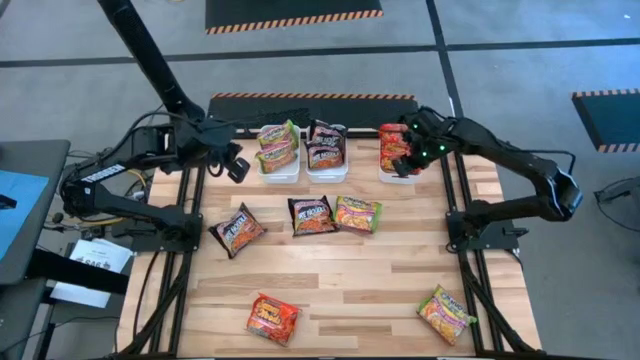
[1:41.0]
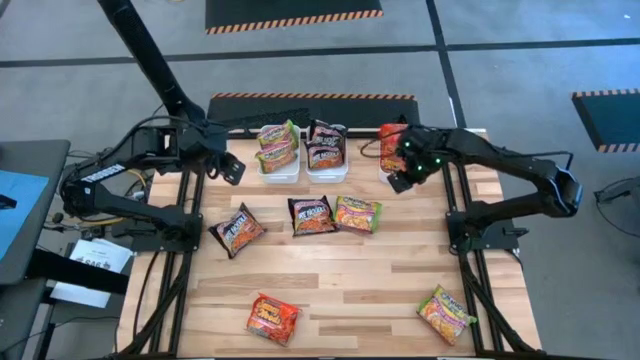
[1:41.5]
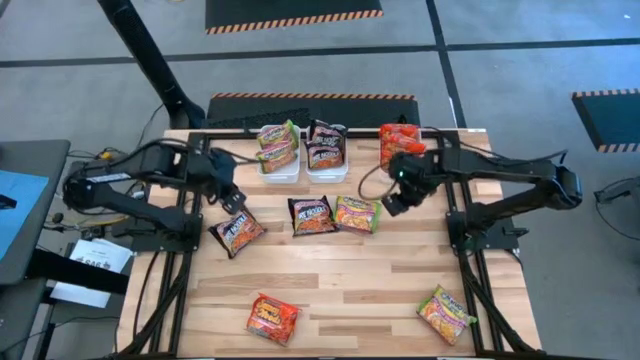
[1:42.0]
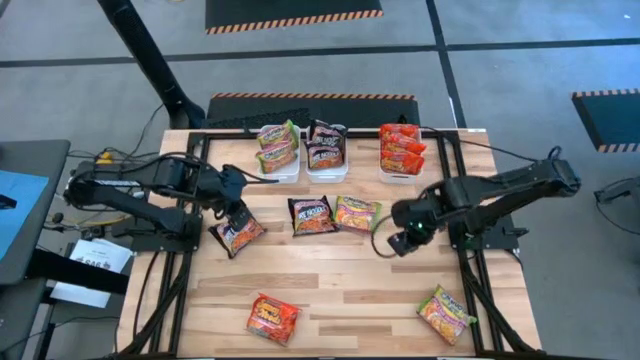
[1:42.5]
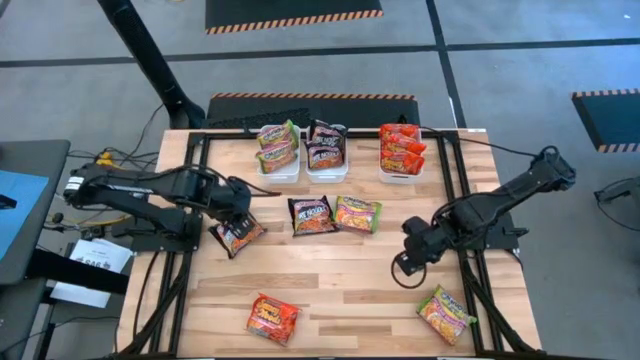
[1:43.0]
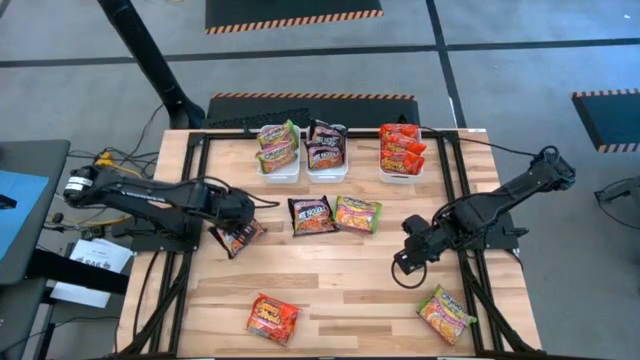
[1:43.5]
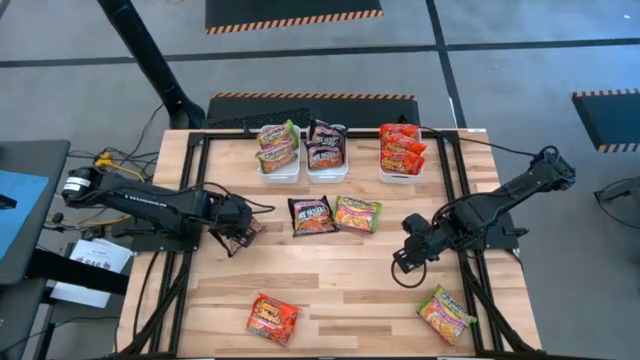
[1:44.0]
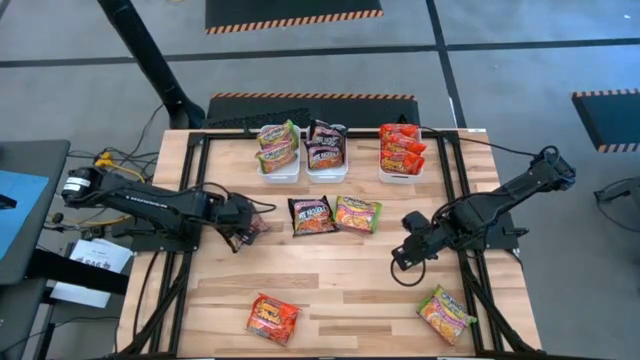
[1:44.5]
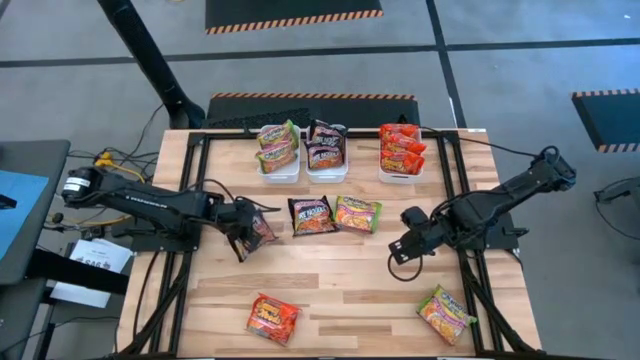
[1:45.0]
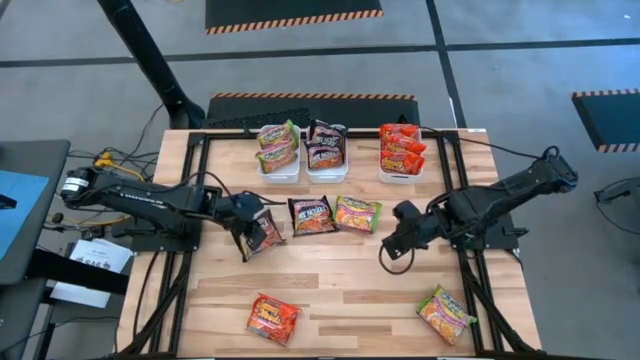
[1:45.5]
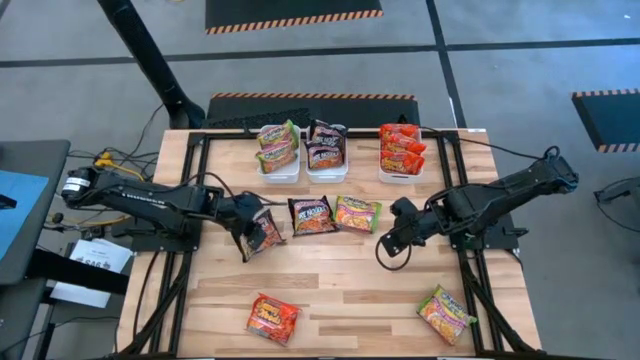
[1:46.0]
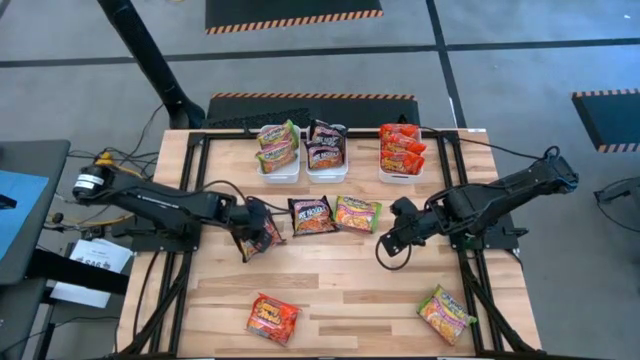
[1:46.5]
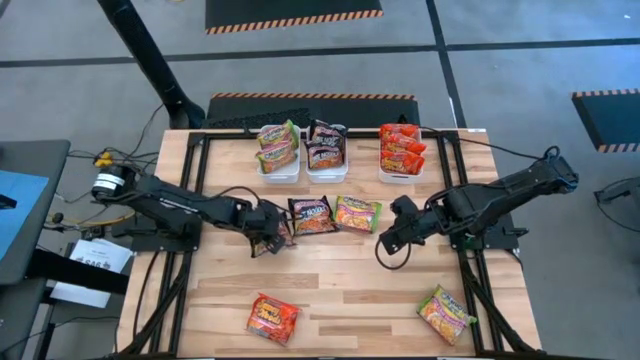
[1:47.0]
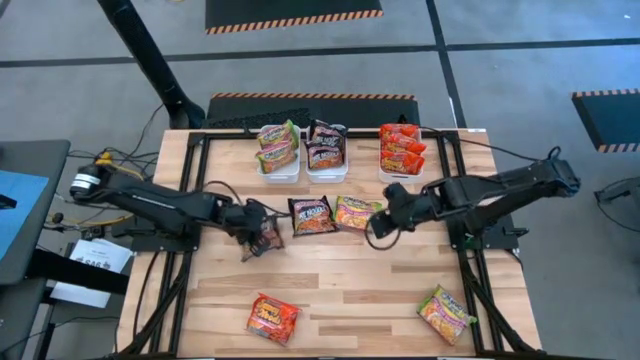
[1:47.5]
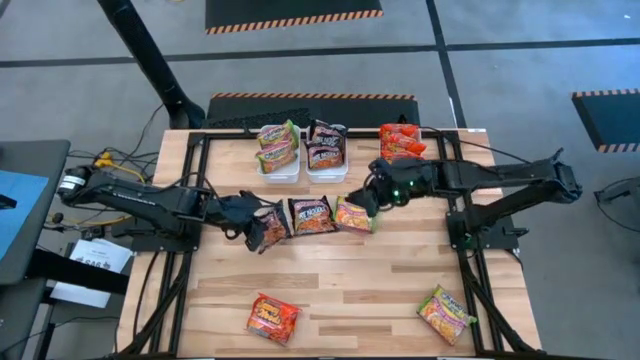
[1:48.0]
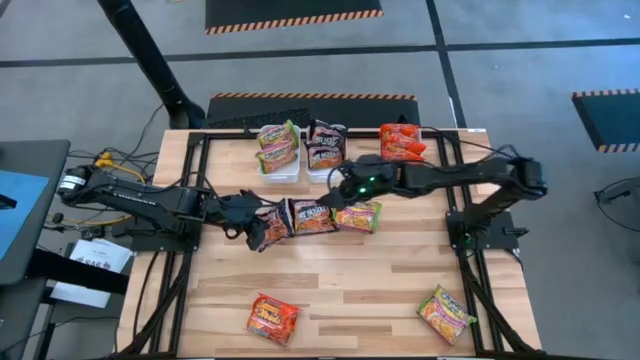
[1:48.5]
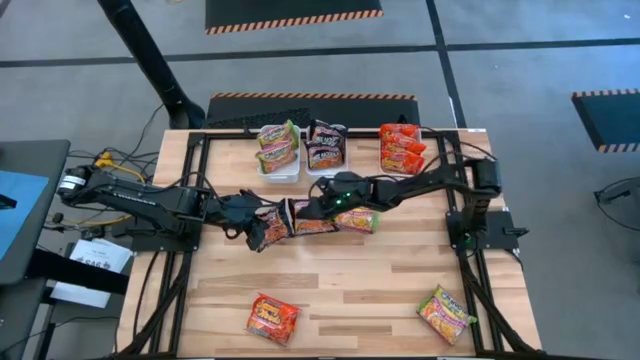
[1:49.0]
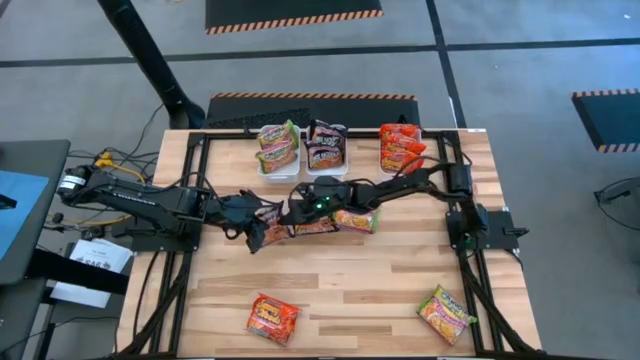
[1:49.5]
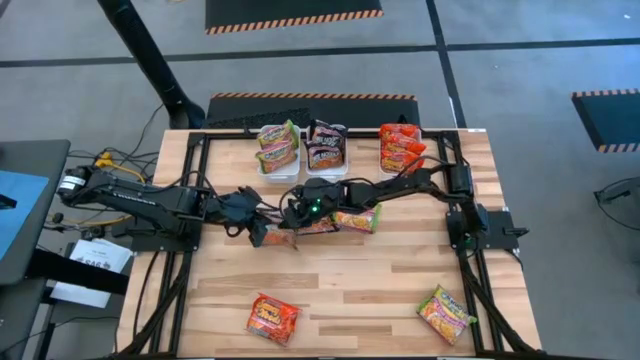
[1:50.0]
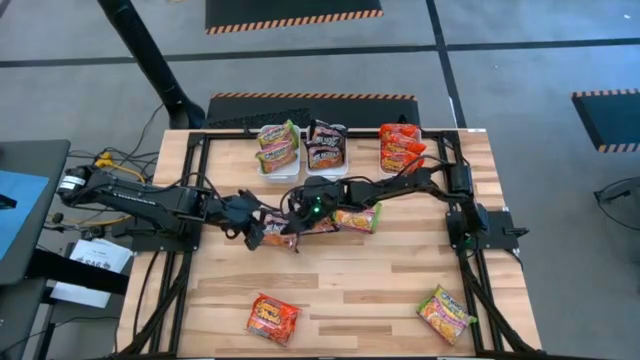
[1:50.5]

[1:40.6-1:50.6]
Task: Sort Maruchan noodles
Put the black noodle pack into the middle white bin

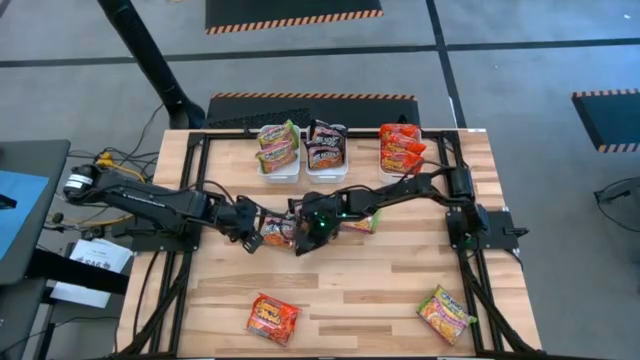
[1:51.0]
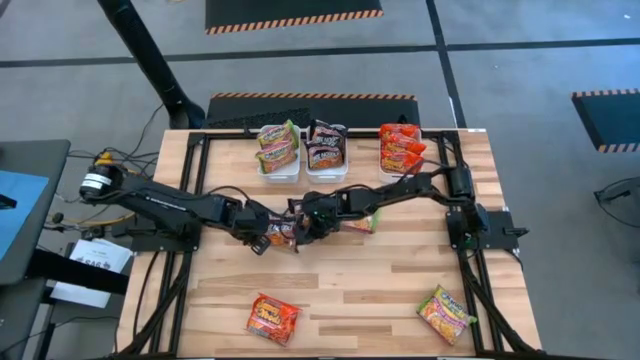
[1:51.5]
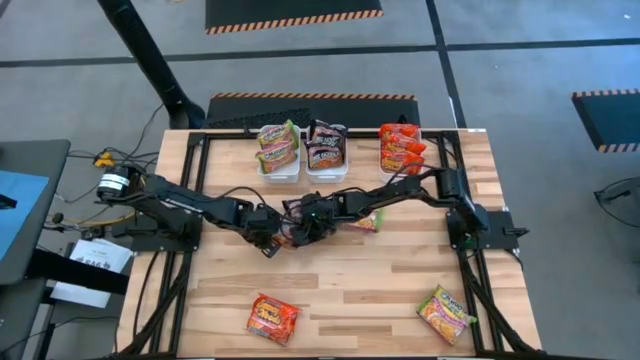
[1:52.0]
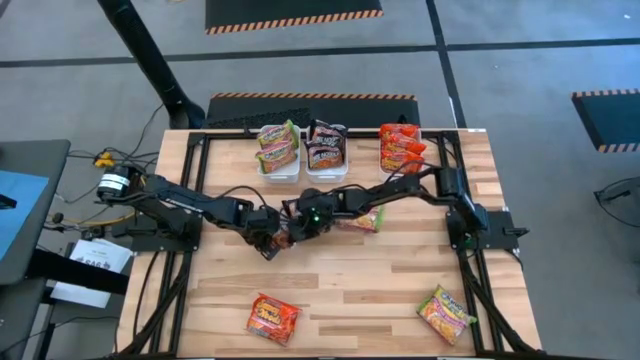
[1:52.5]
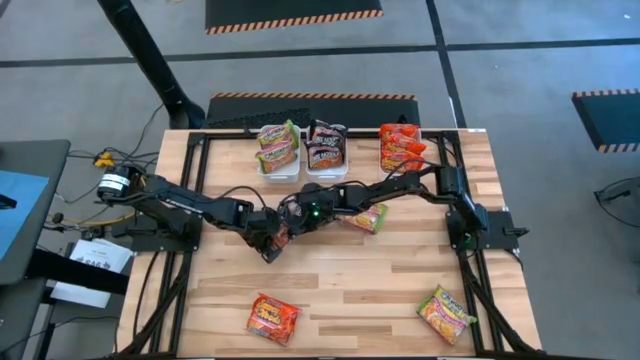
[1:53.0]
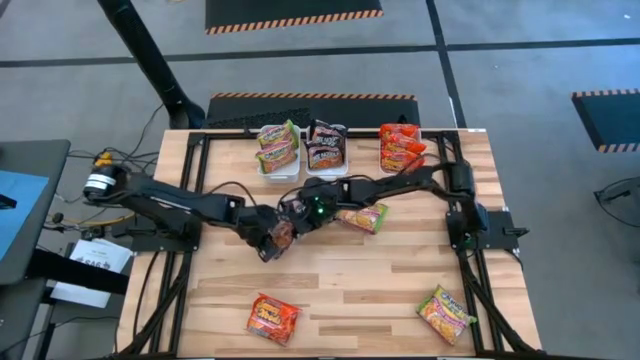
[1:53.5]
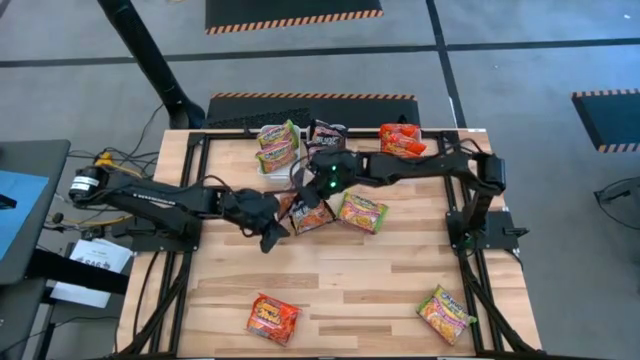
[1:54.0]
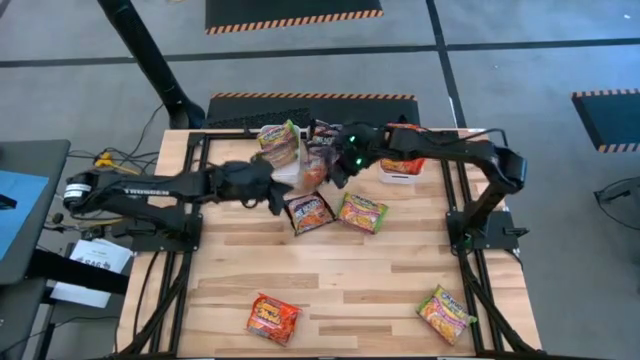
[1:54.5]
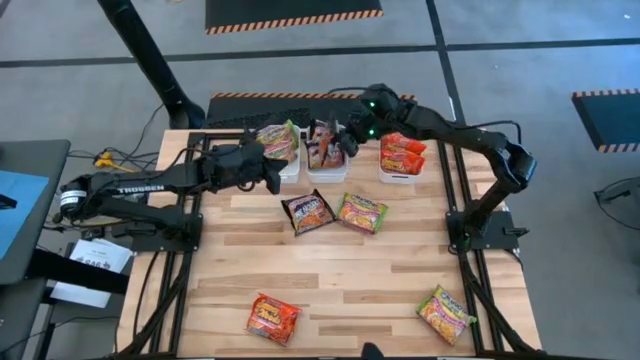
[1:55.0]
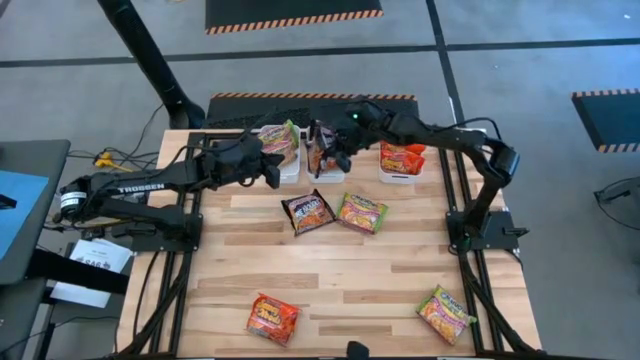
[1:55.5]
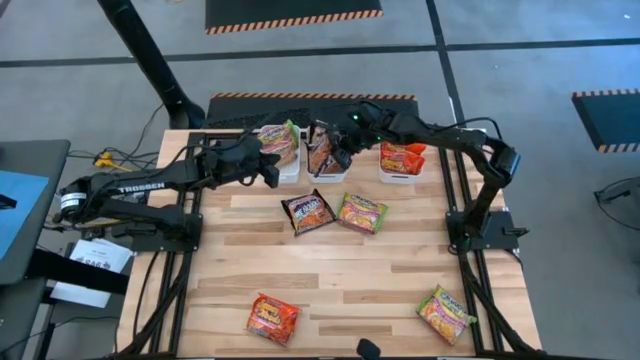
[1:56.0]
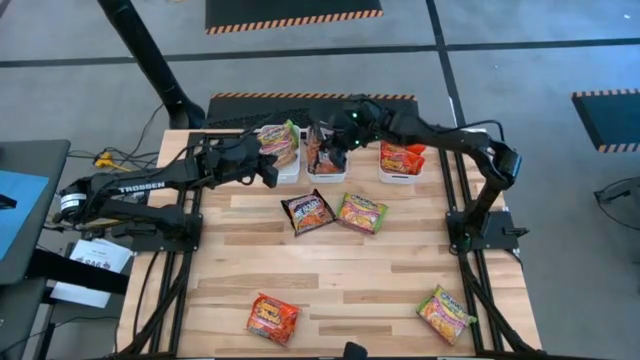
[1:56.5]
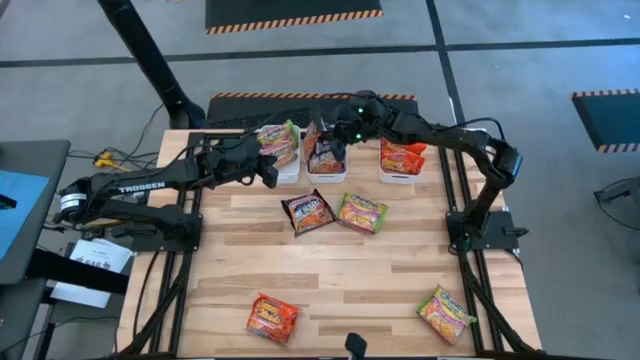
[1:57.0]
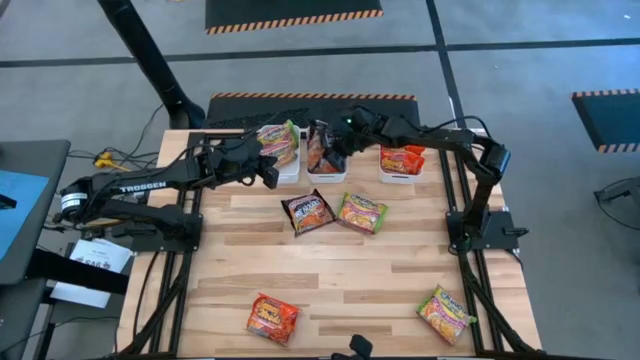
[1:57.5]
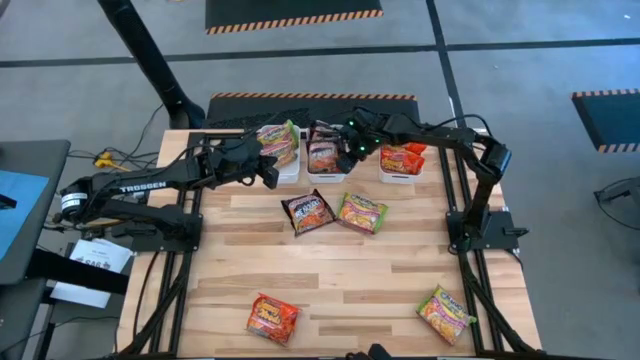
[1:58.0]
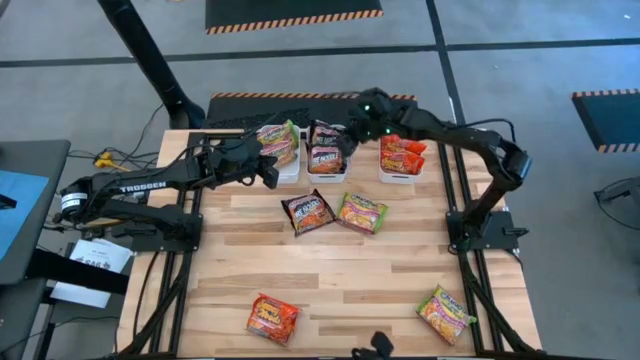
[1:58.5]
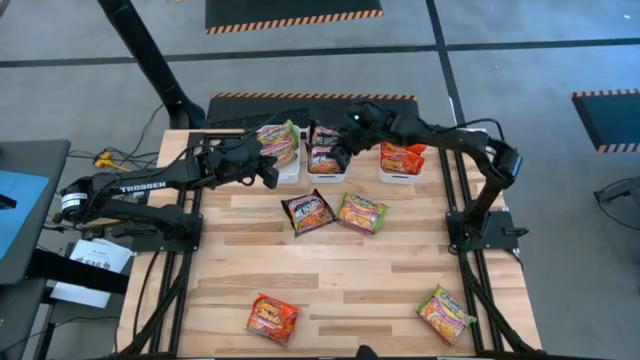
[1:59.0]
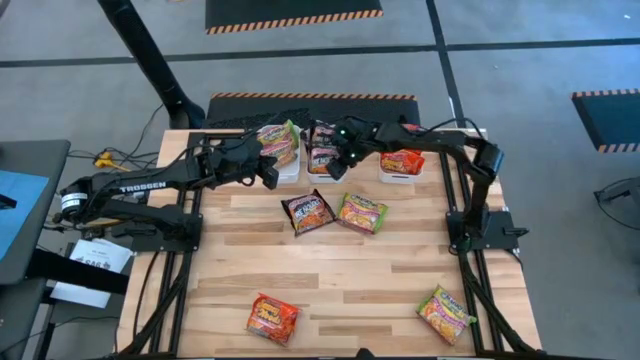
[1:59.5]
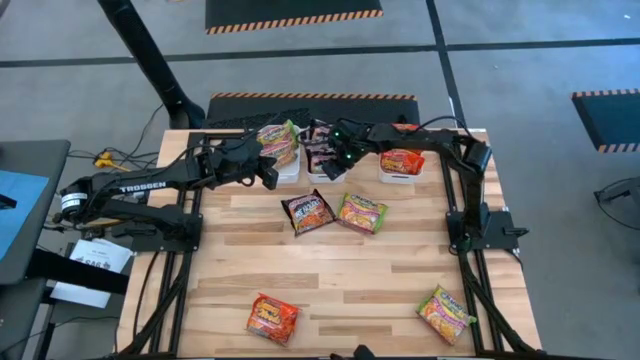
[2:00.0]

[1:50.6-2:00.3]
Put the black noodle pack into the middle white bin

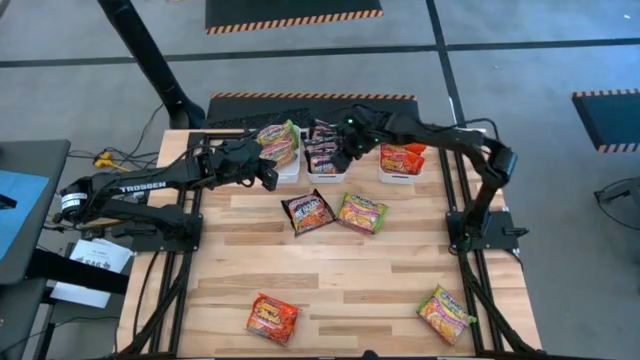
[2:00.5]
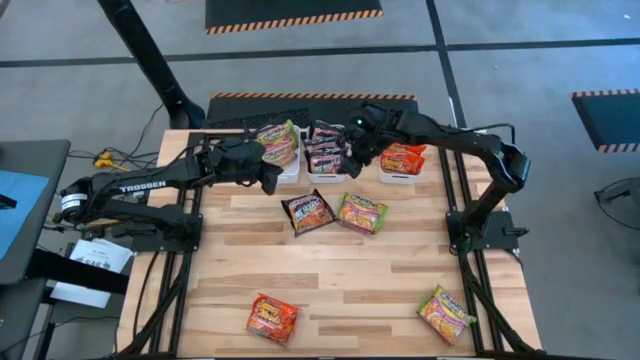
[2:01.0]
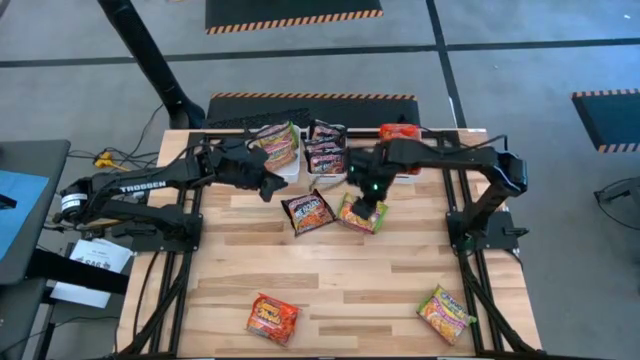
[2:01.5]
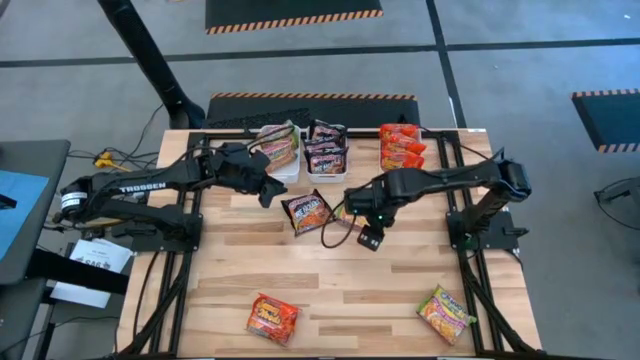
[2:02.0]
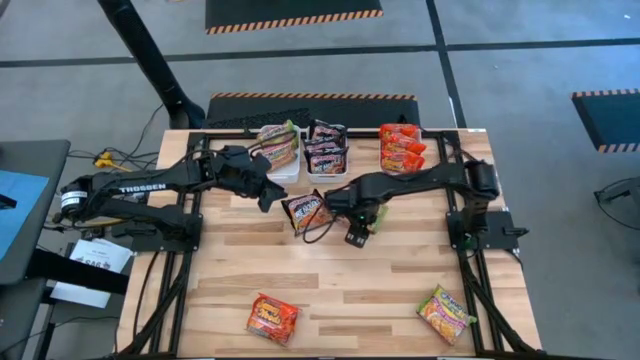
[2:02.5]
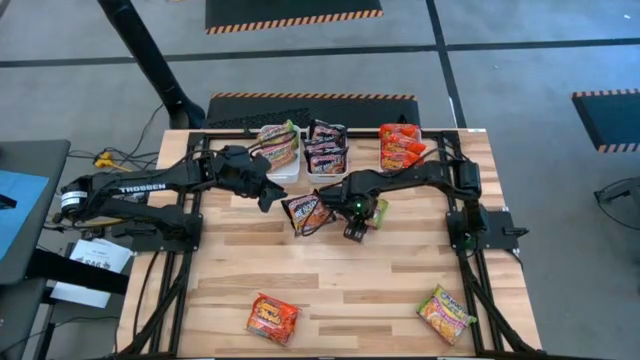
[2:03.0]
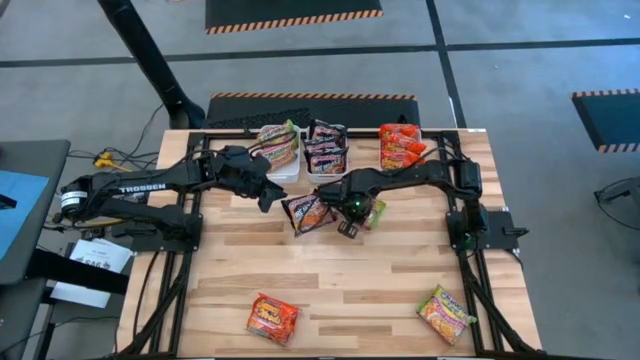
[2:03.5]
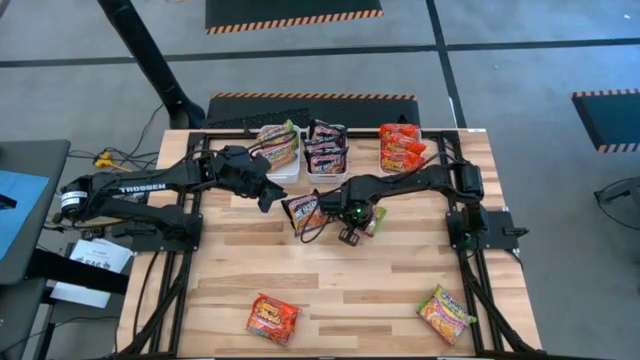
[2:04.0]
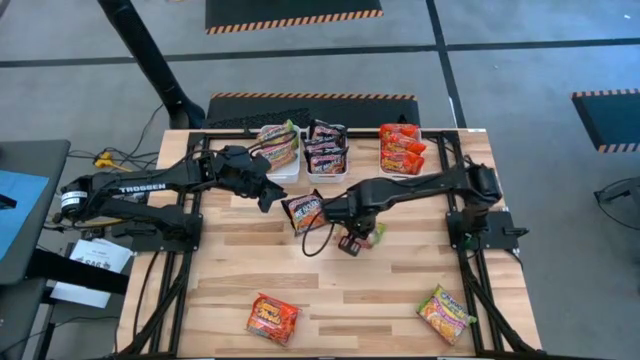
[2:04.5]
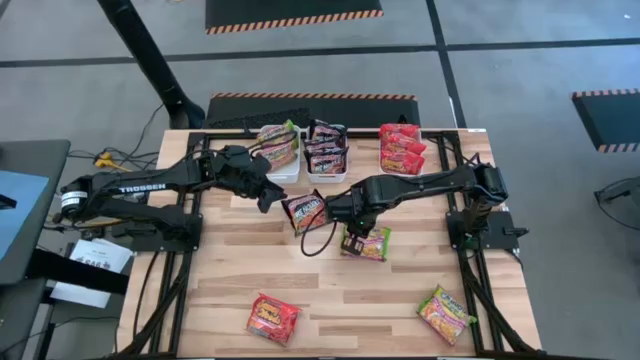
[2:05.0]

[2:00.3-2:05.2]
Put the green noodle pack into the left white bin
